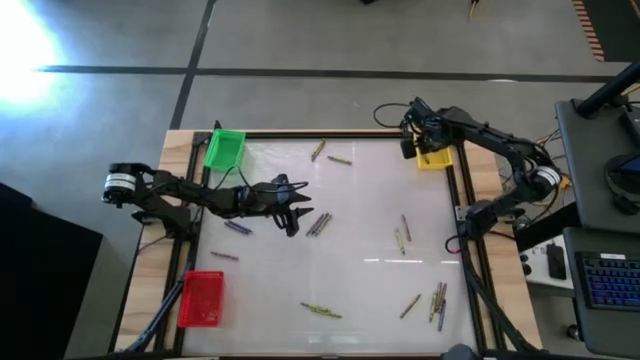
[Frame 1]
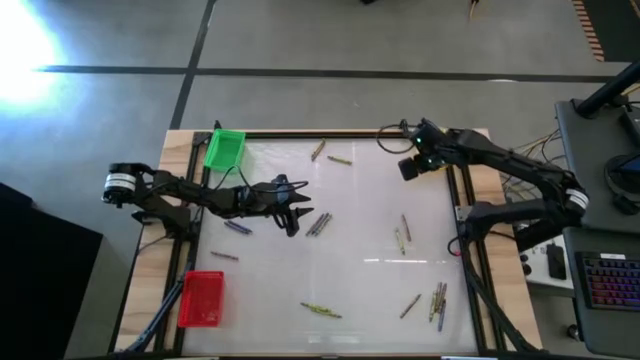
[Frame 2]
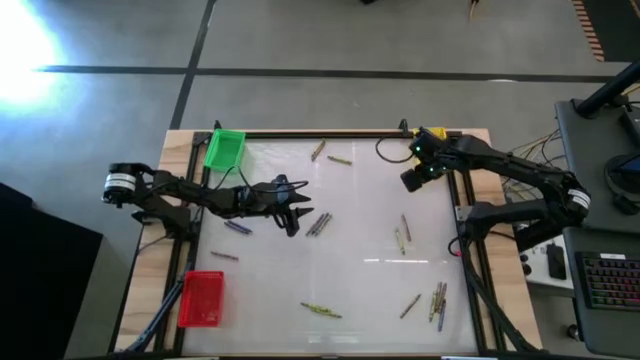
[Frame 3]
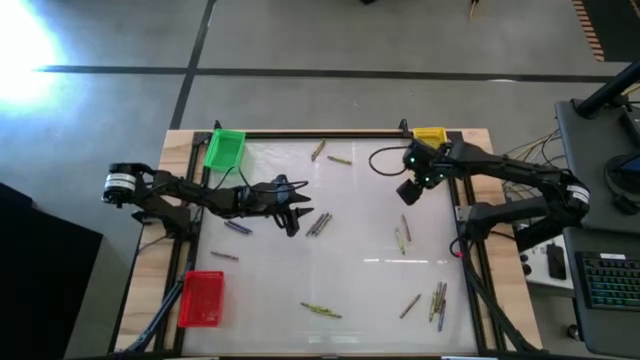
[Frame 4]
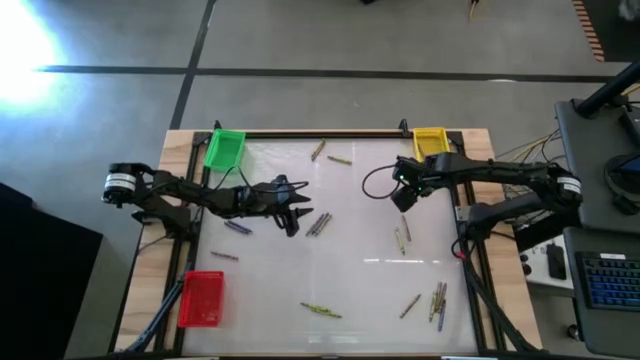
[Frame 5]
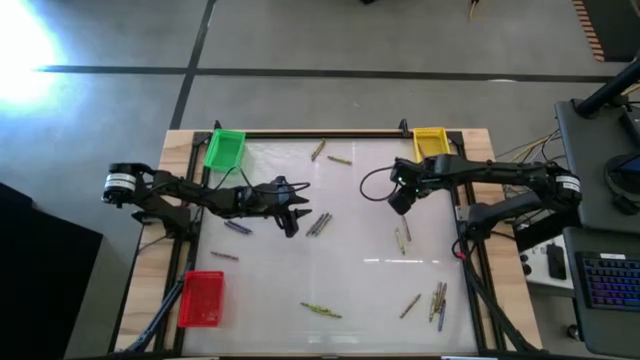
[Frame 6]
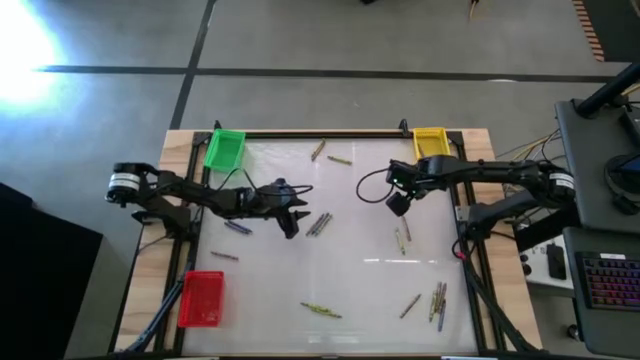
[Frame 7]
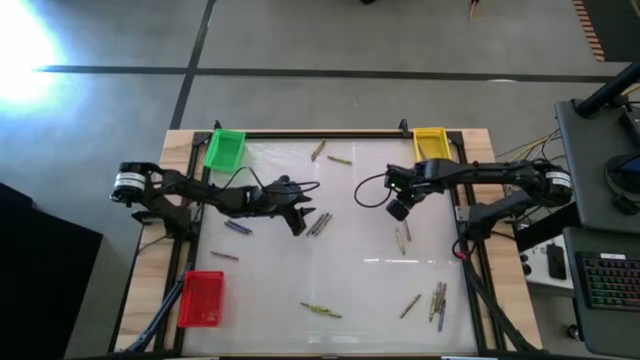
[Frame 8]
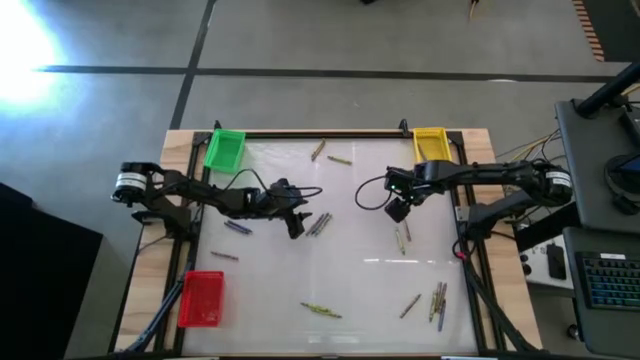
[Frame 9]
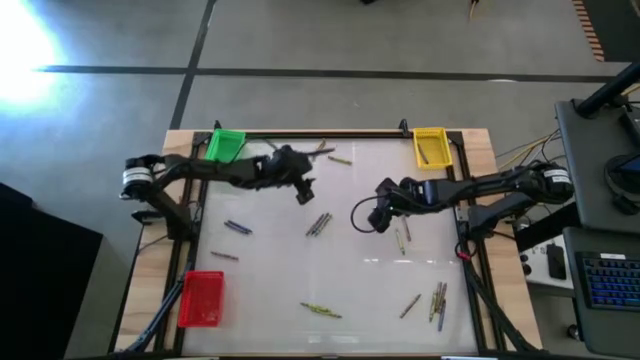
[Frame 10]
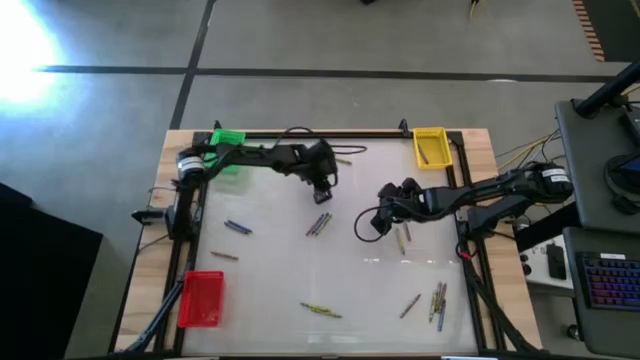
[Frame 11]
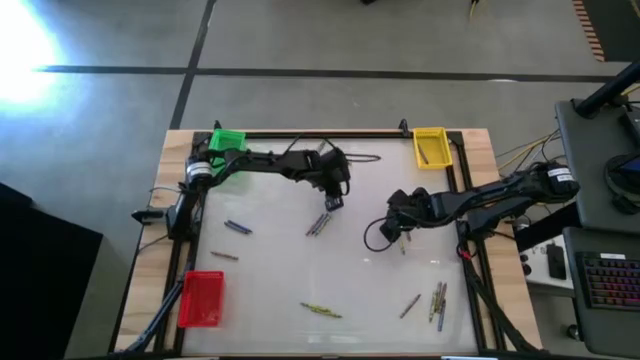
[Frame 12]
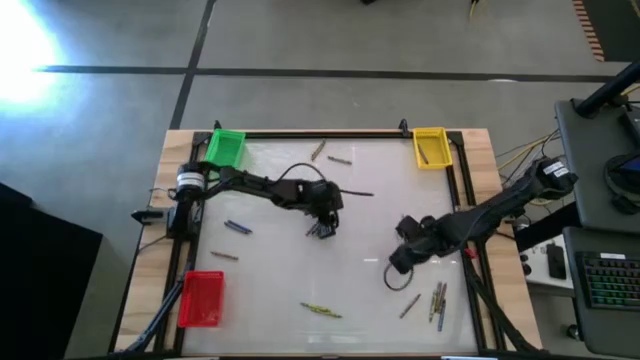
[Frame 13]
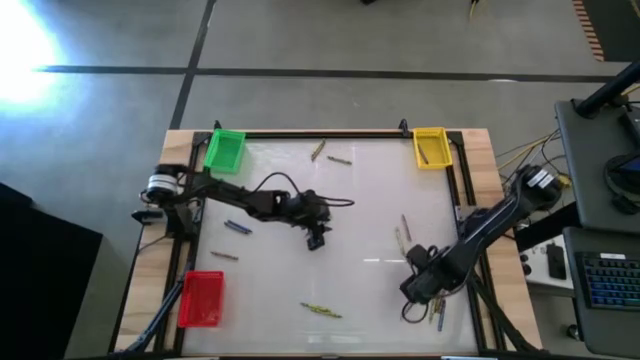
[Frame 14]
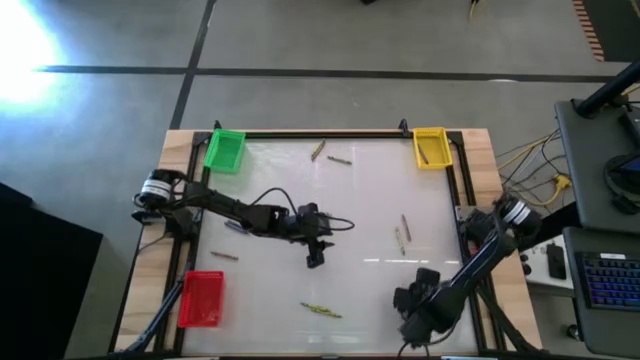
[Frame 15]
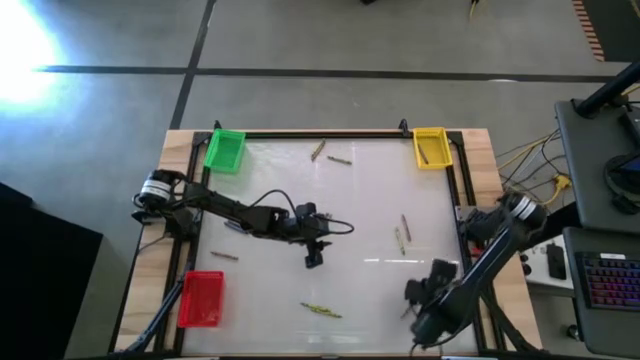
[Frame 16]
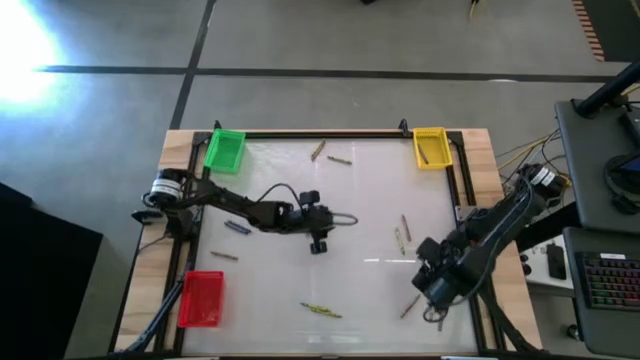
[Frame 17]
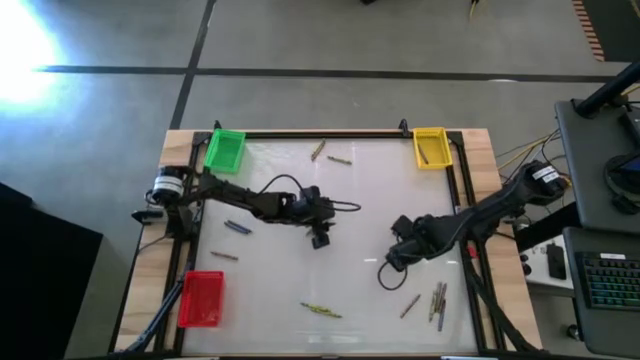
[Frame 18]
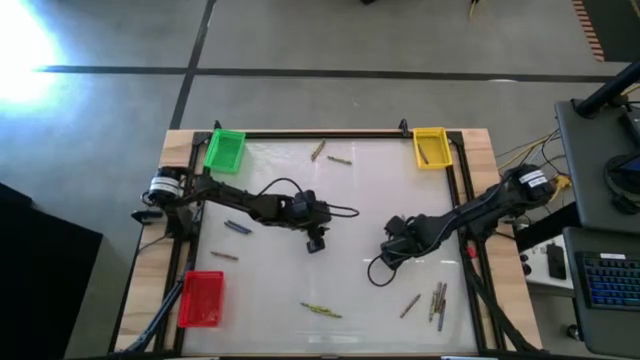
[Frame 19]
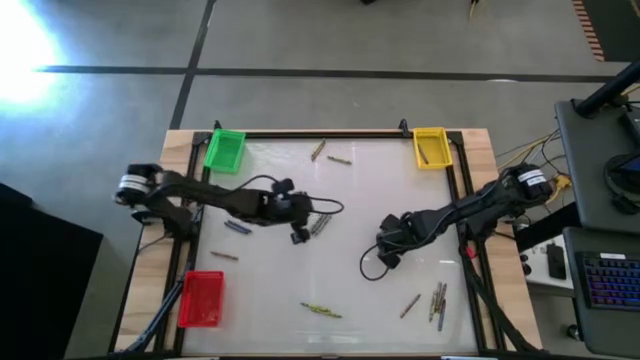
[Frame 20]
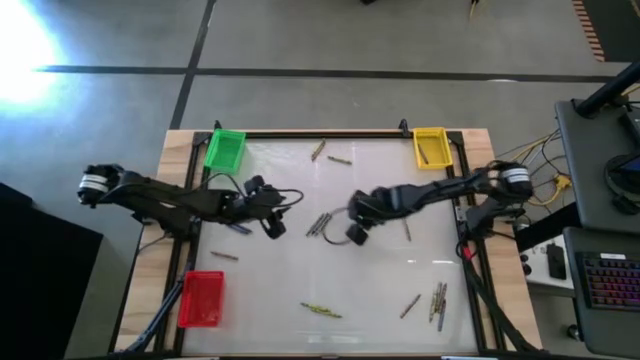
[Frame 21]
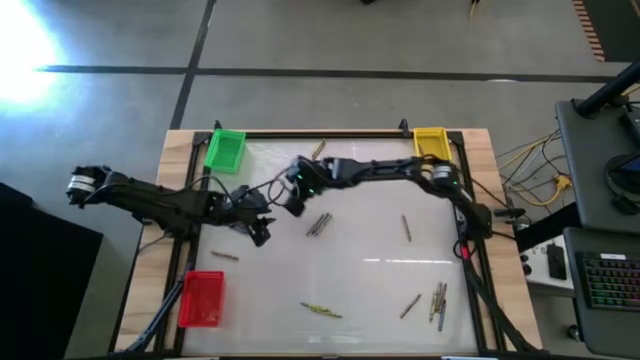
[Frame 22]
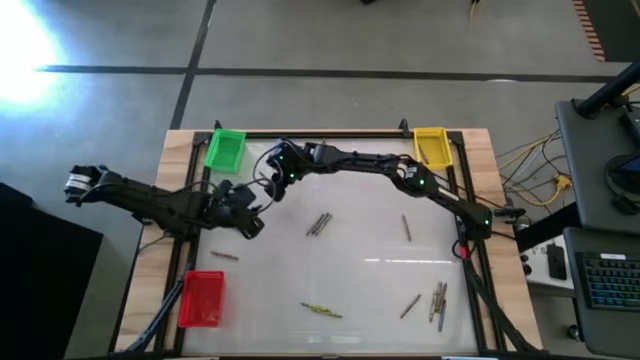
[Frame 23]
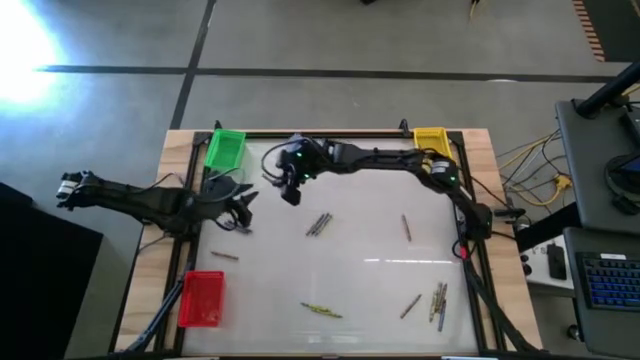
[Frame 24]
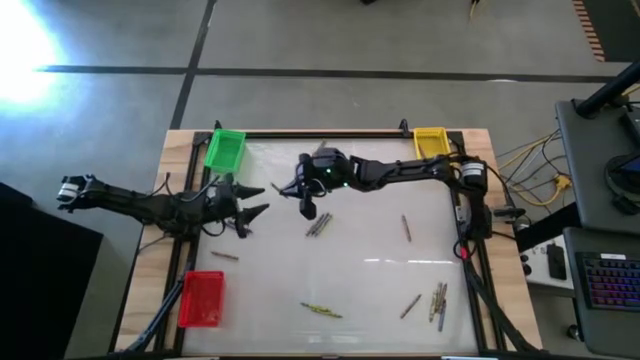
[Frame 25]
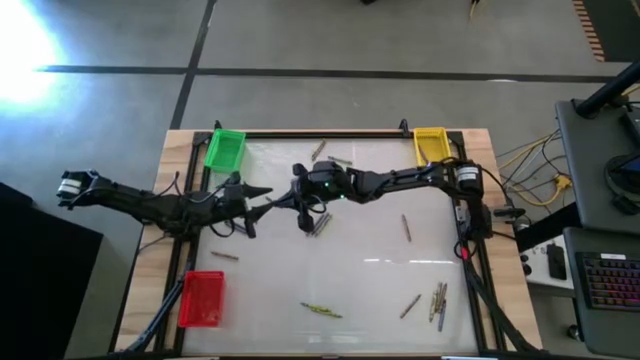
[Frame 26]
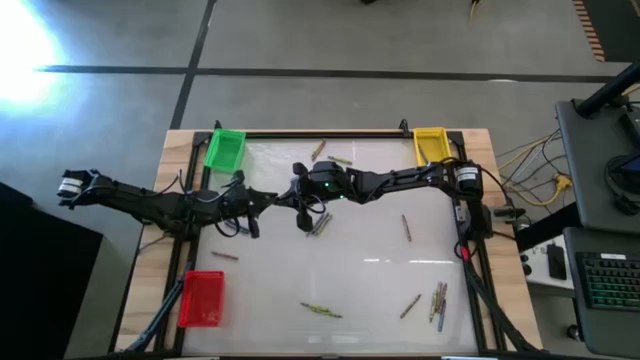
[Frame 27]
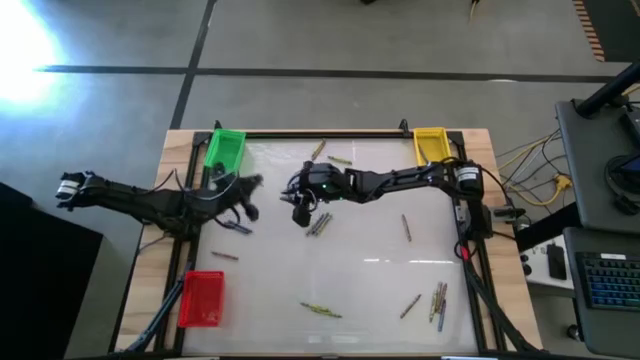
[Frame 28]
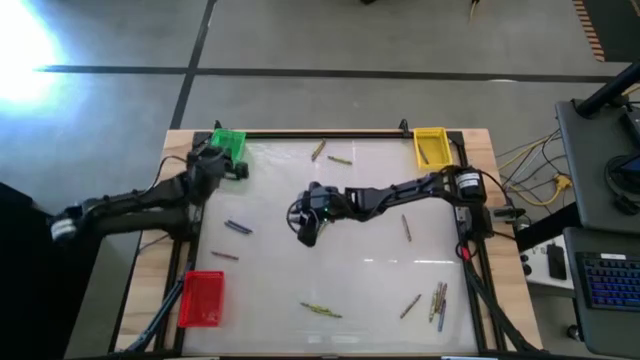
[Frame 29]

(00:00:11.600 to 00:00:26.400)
Task: Sort crayons
Put the green crayon into the green basket
